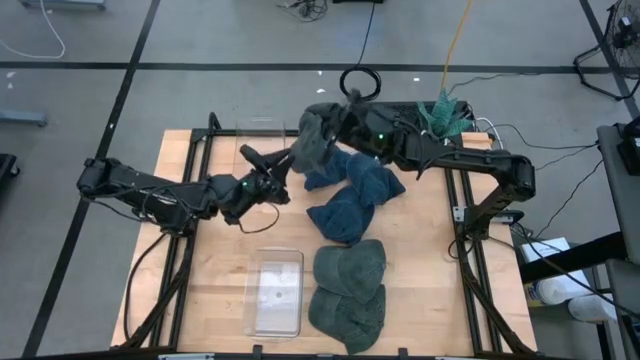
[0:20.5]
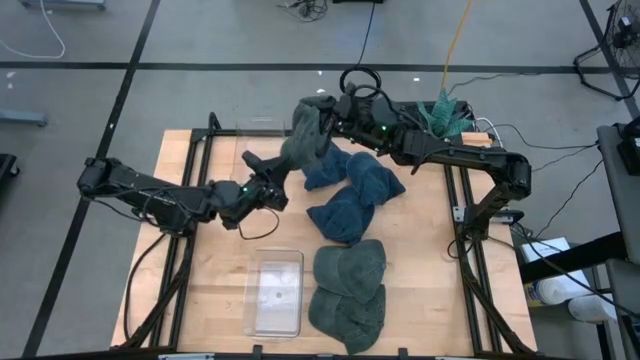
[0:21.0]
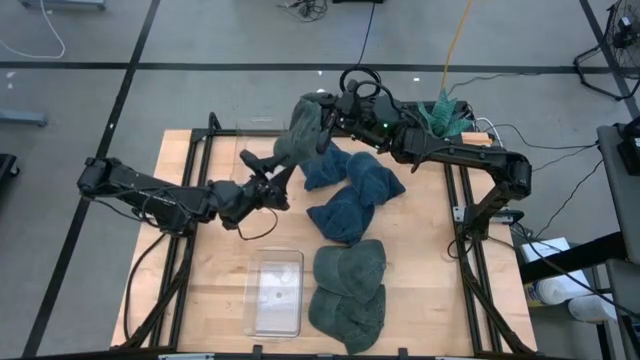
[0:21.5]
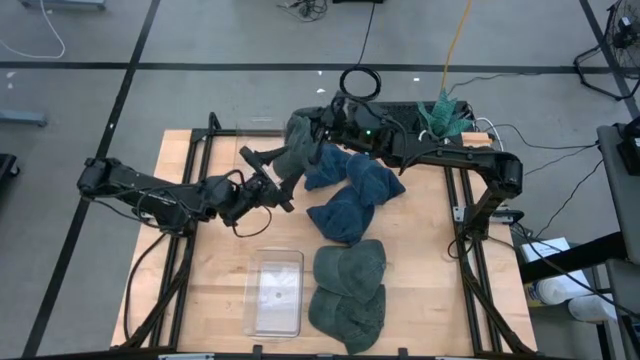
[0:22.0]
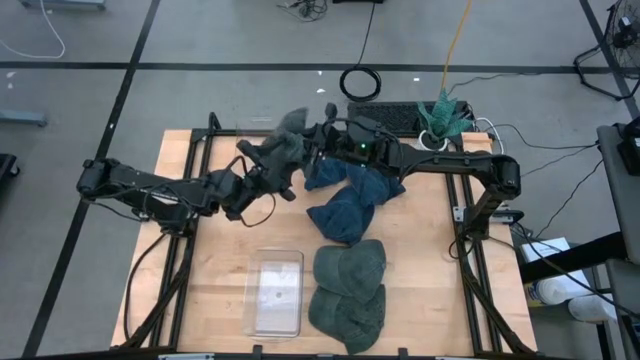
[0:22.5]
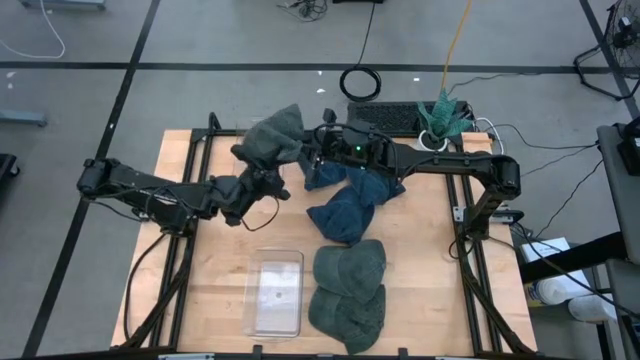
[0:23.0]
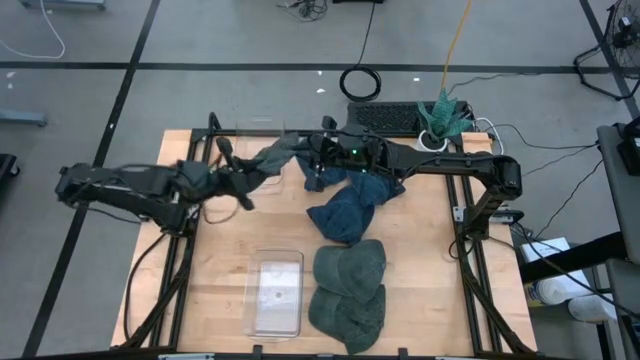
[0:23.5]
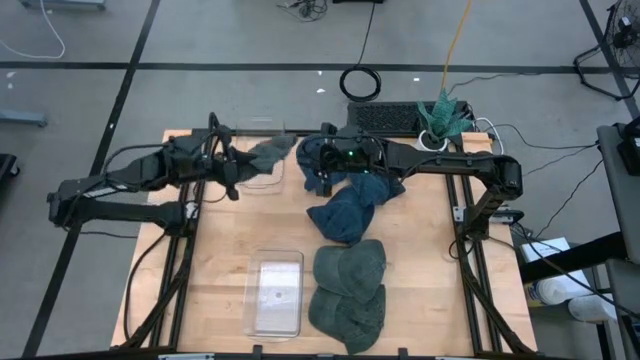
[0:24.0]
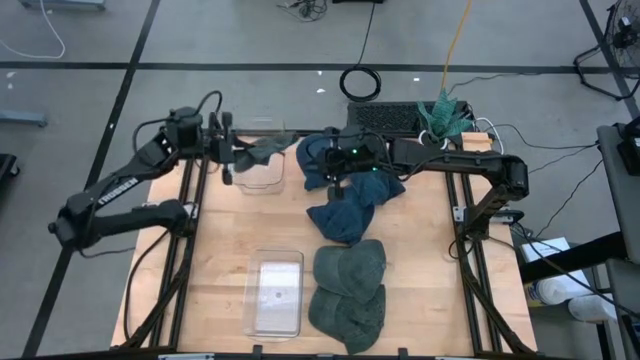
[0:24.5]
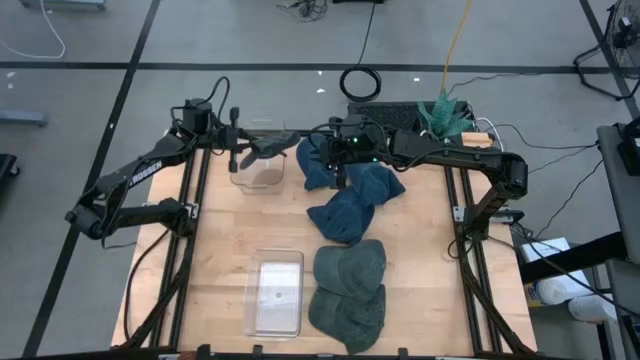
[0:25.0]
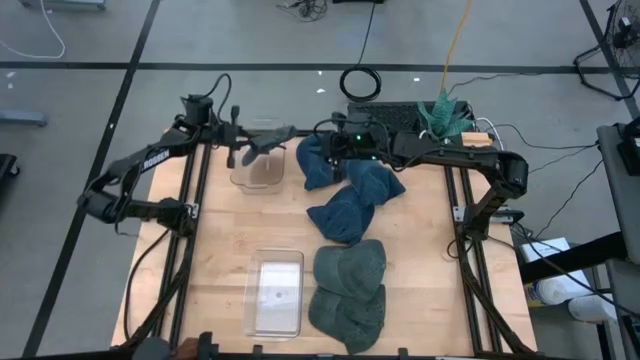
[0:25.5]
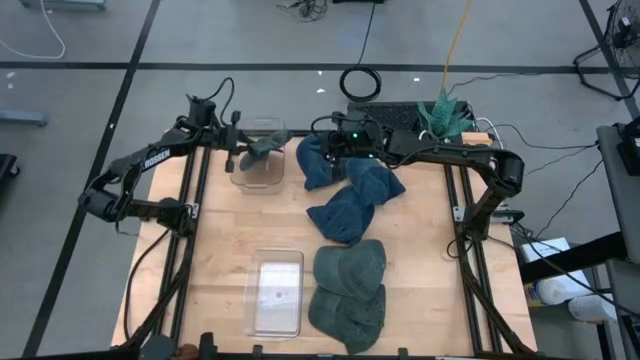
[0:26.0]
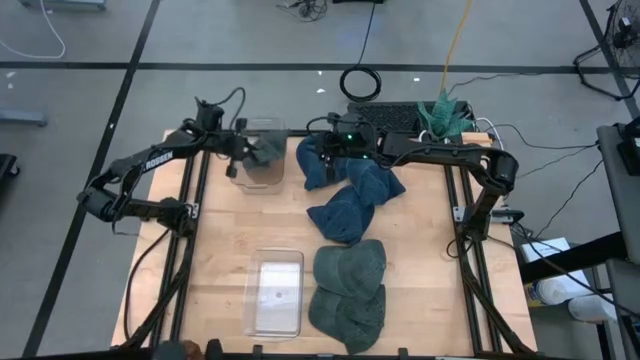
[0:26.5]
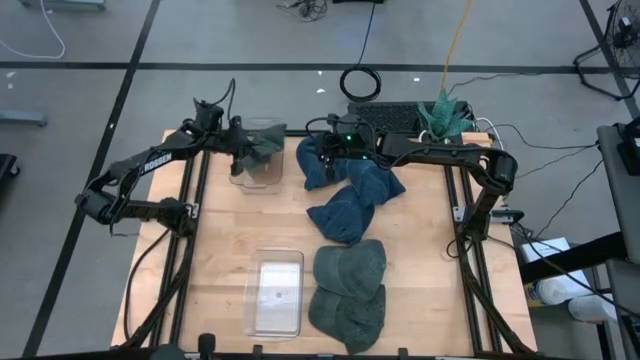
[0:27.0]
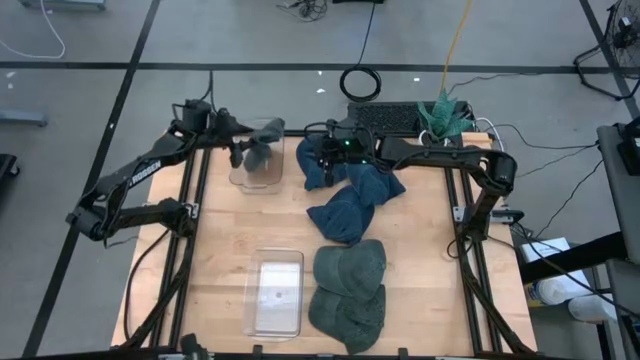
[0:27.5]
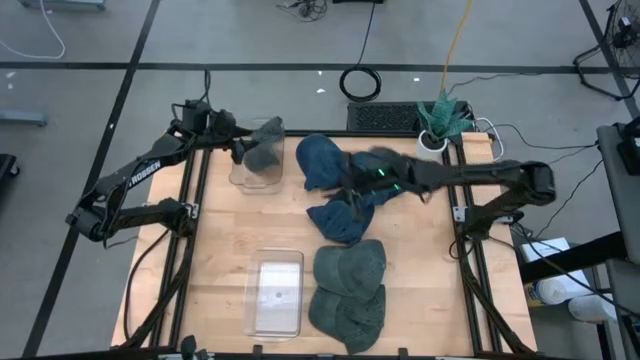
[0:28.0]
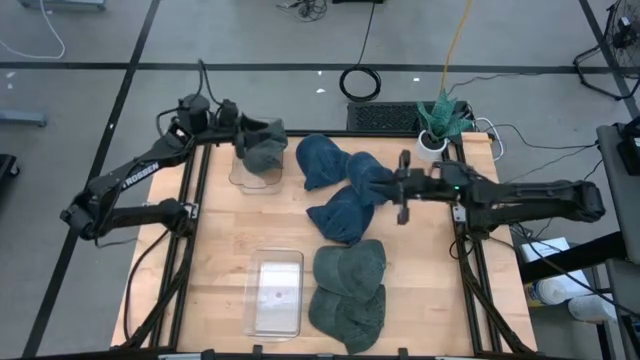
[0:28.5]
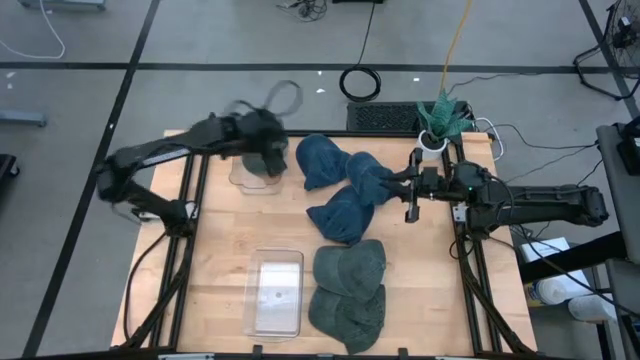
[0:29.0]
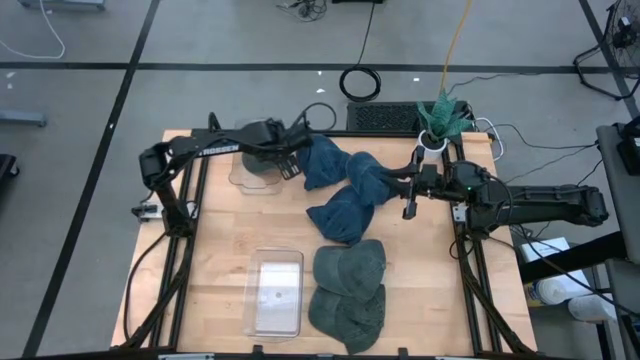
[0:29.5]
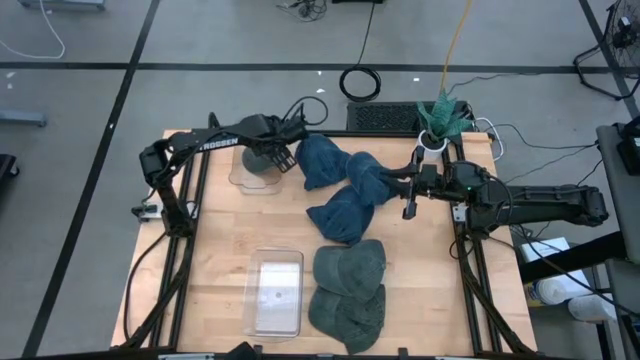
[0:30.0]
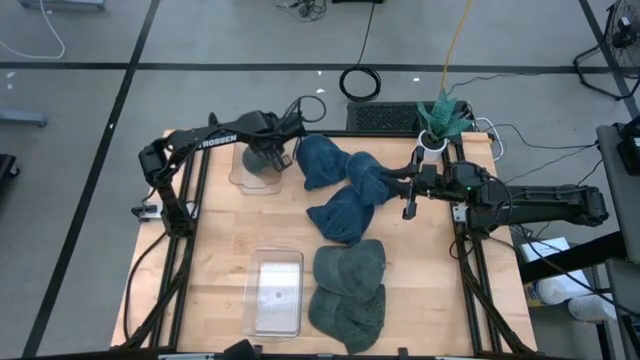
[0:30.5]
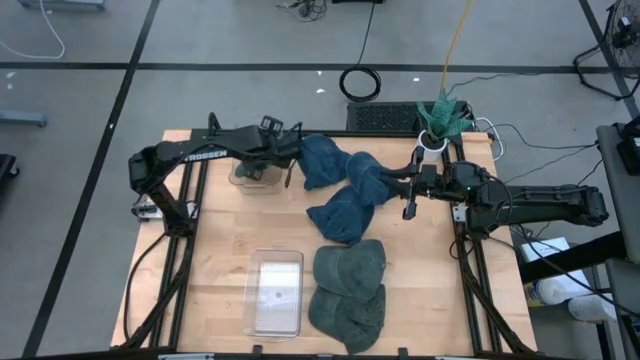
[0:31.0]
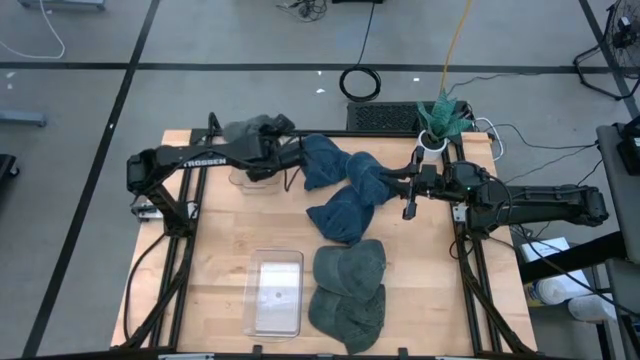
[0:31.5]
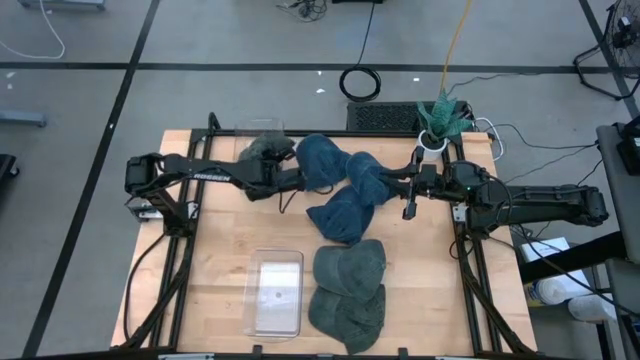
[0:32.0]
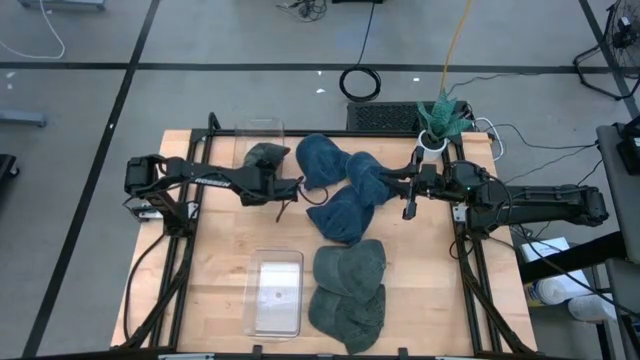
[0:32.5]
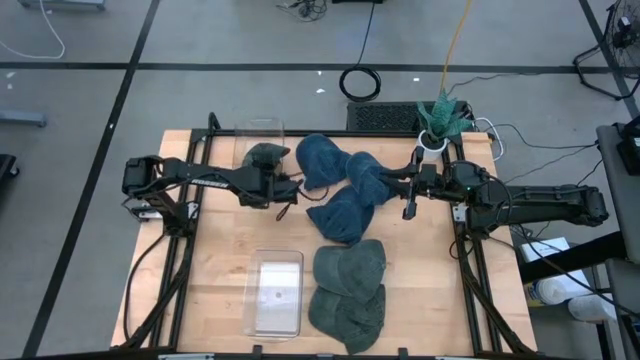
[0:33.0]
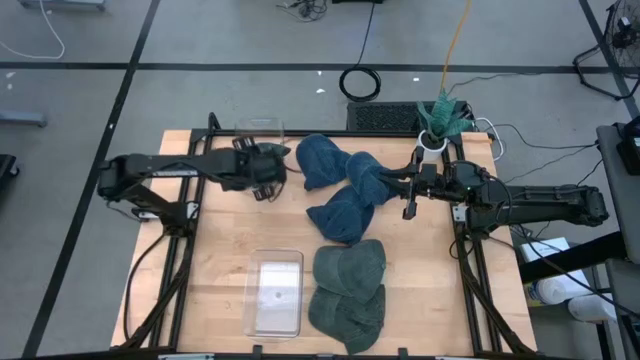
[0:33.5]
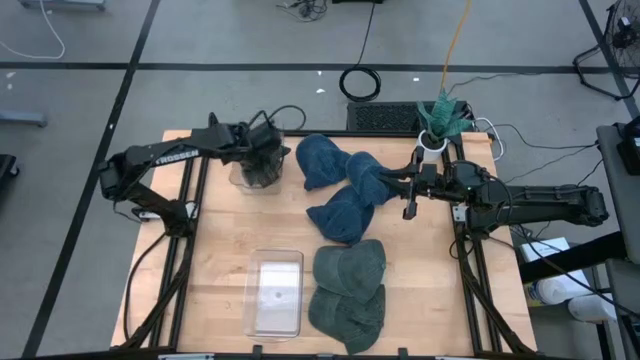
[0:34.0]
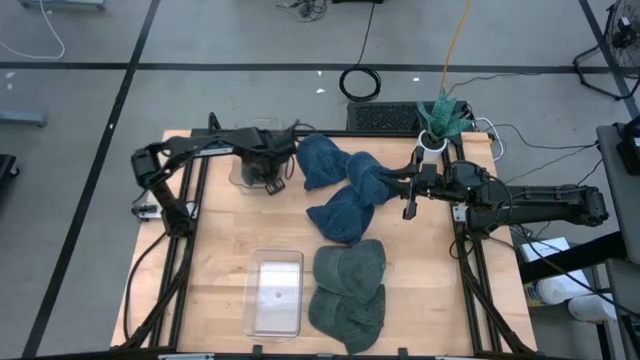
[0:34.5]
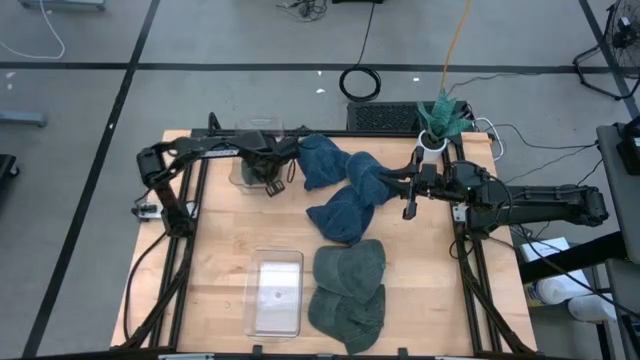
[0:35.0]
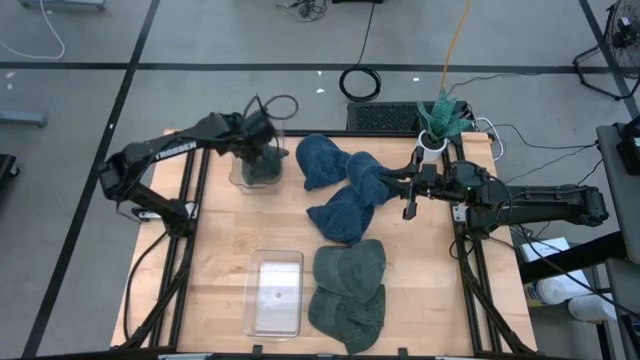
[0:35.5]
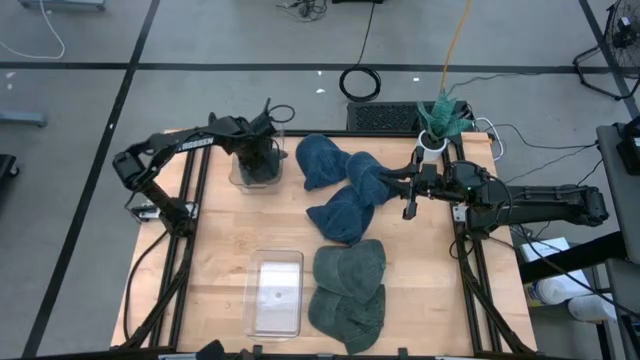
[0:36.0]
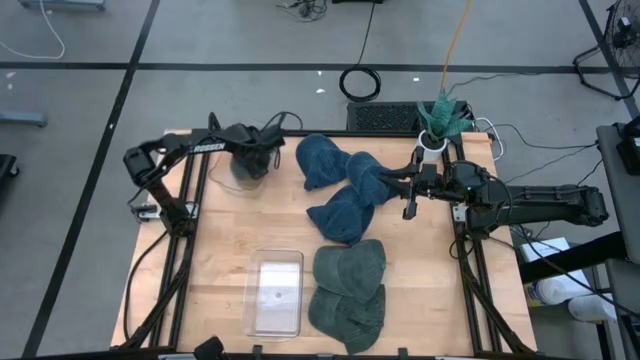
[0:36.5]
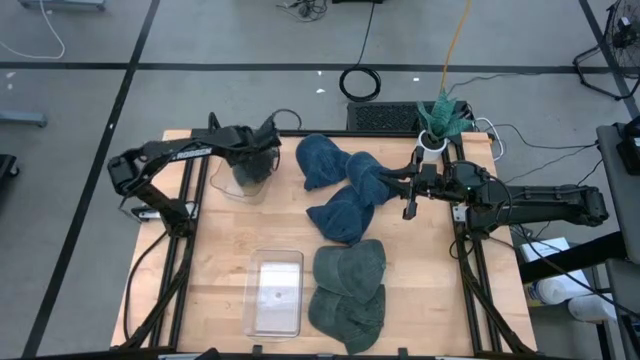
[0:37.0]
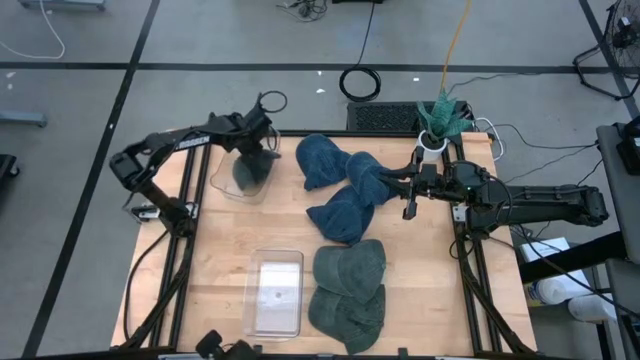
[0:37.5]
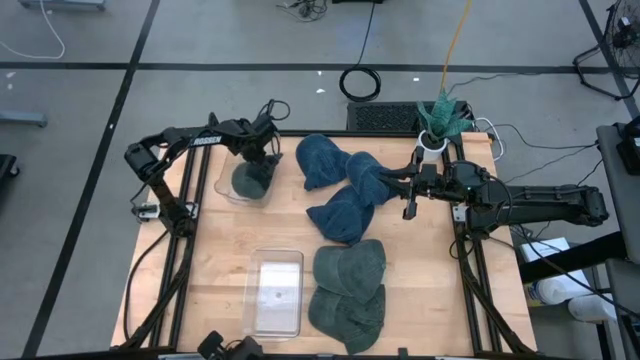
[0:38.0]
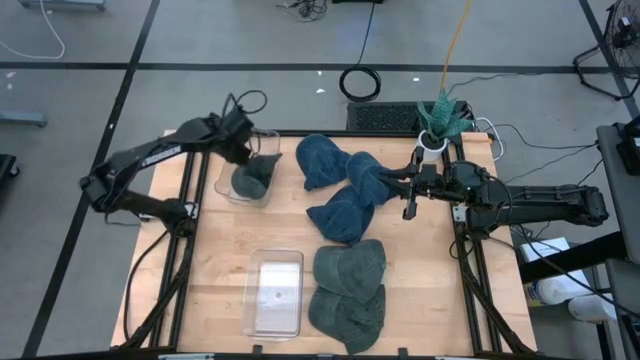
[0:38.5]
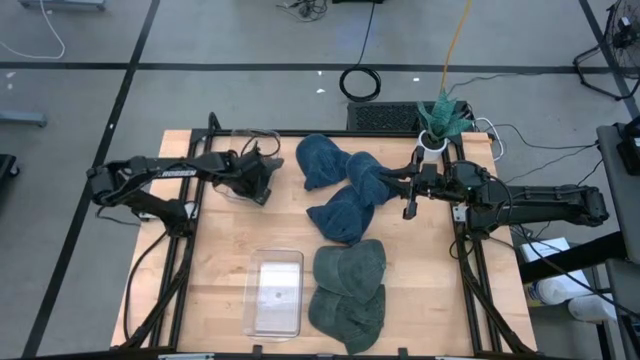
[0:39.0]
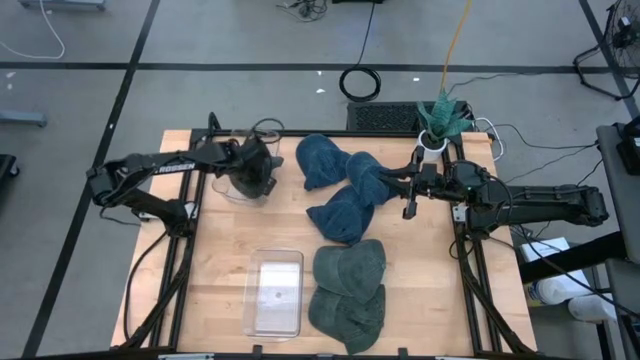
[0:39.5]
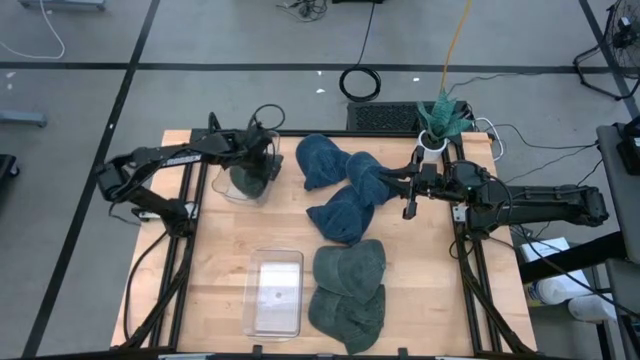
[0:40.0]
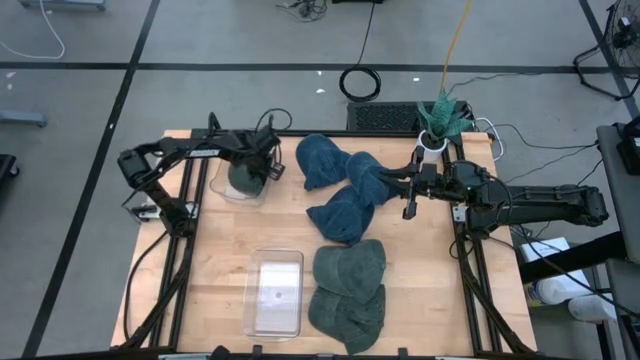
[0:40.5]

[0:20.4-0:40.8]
Task: Pick & Place hat
Put the top green cap into the top transparent bin
